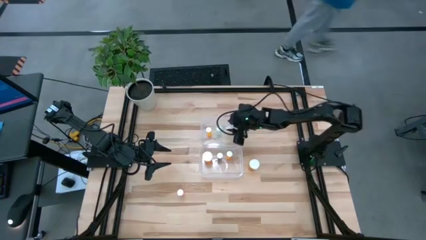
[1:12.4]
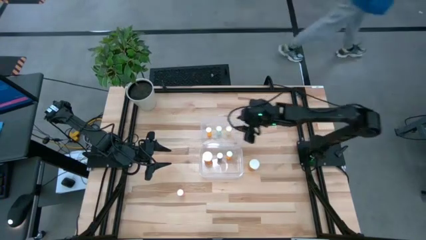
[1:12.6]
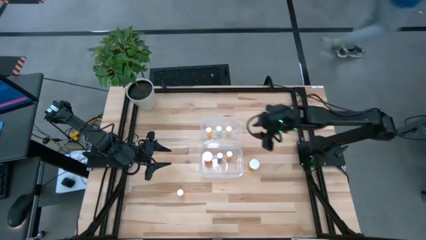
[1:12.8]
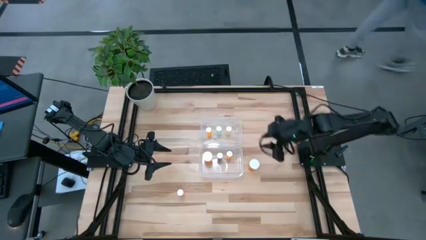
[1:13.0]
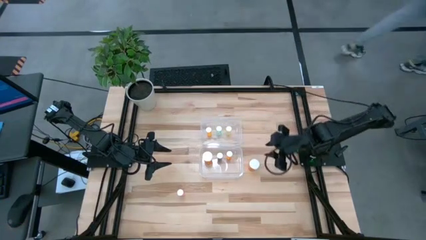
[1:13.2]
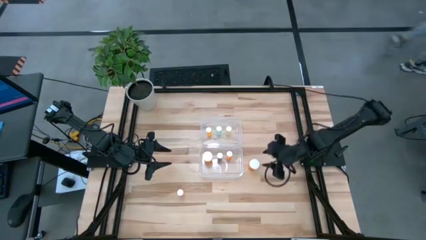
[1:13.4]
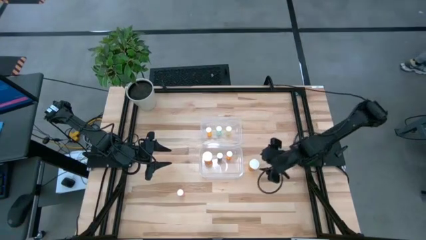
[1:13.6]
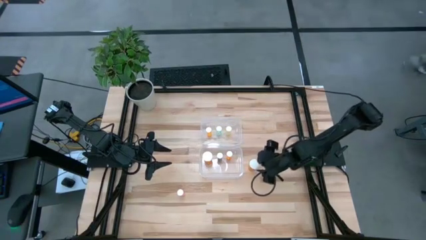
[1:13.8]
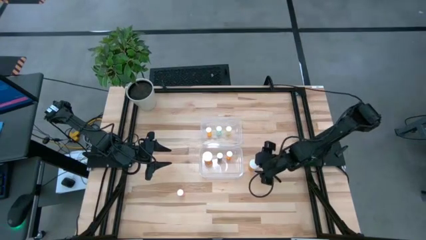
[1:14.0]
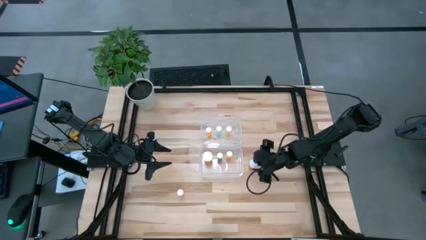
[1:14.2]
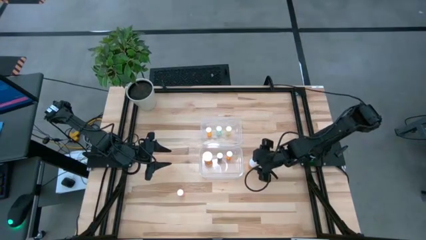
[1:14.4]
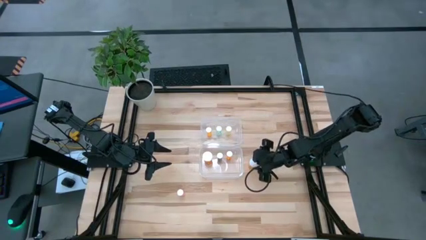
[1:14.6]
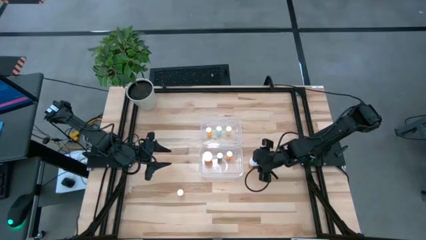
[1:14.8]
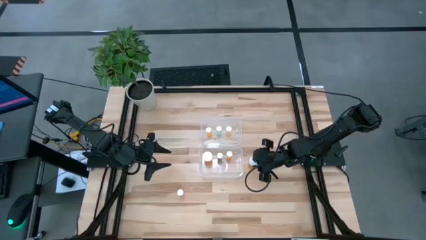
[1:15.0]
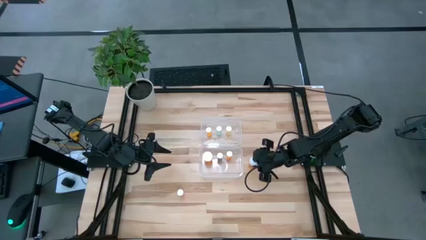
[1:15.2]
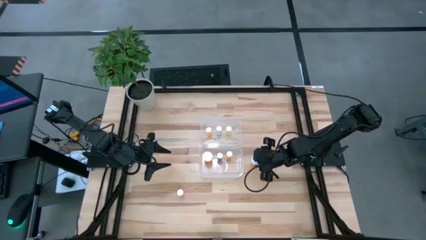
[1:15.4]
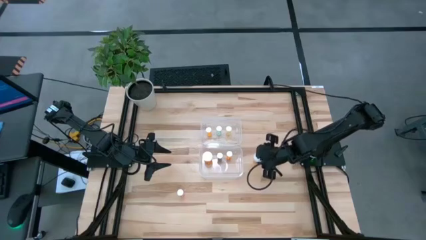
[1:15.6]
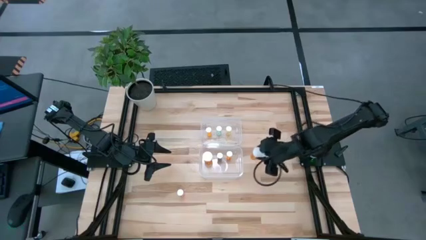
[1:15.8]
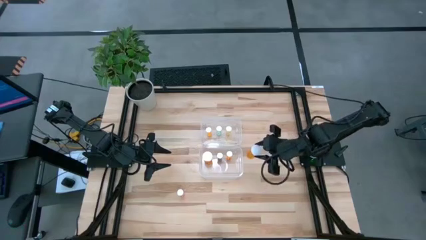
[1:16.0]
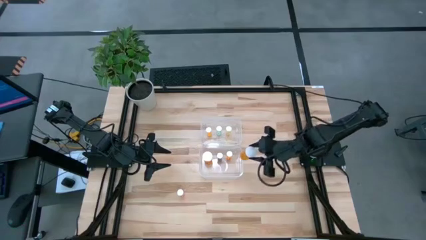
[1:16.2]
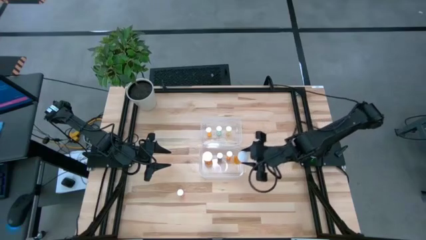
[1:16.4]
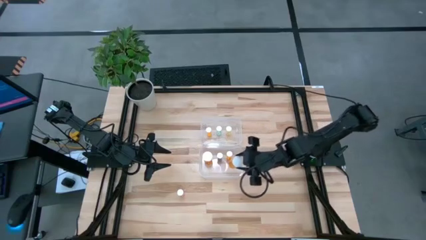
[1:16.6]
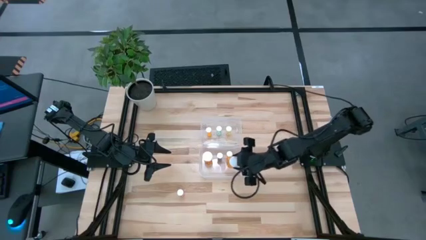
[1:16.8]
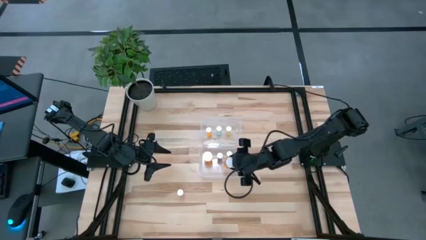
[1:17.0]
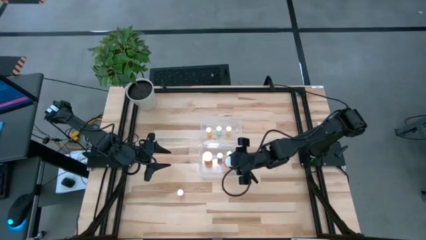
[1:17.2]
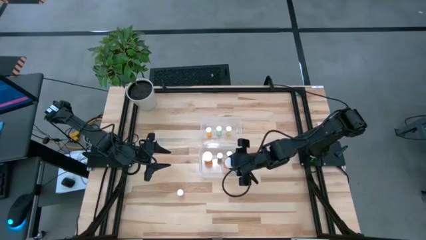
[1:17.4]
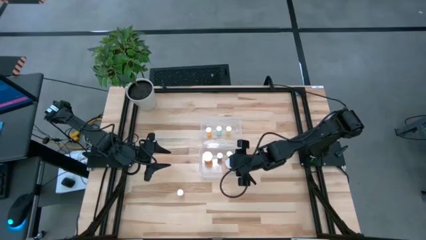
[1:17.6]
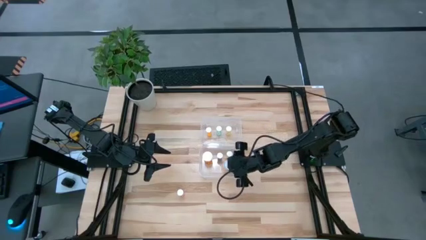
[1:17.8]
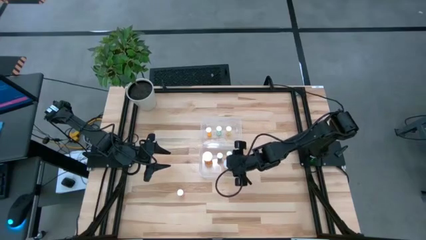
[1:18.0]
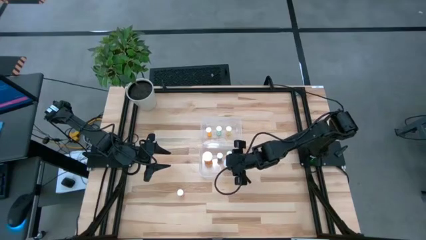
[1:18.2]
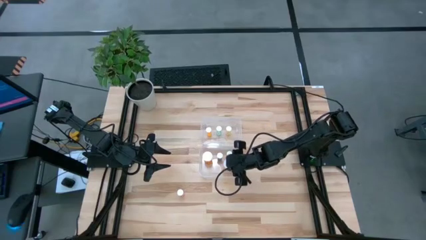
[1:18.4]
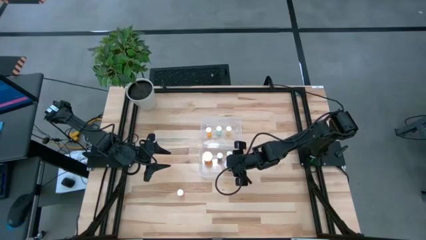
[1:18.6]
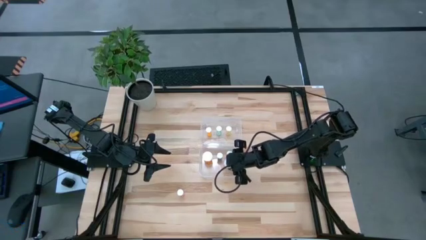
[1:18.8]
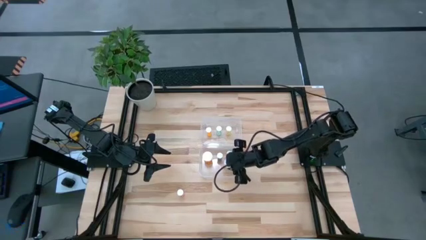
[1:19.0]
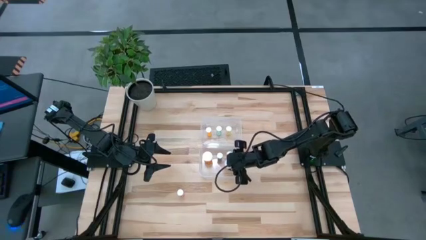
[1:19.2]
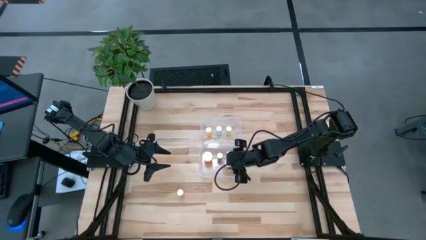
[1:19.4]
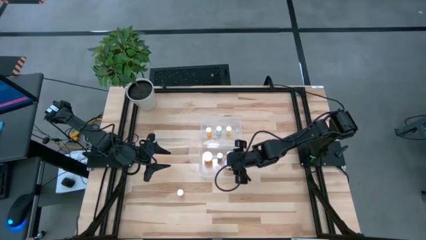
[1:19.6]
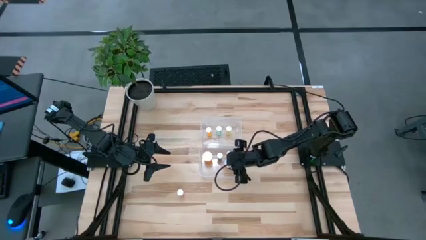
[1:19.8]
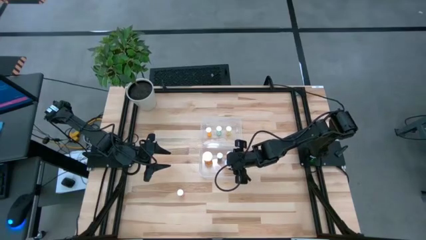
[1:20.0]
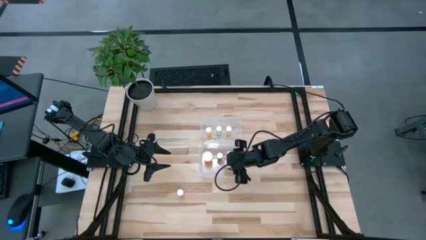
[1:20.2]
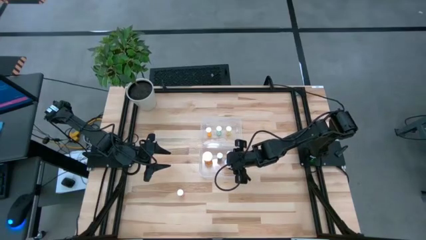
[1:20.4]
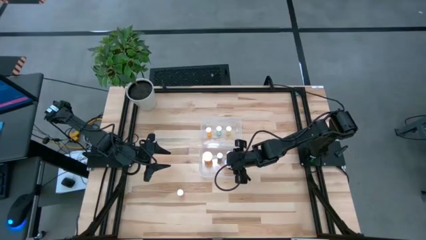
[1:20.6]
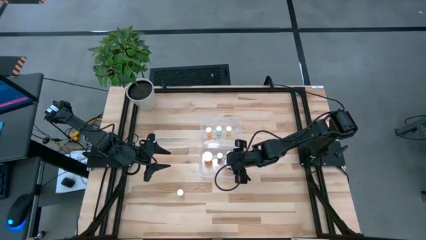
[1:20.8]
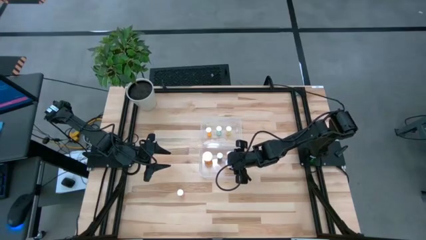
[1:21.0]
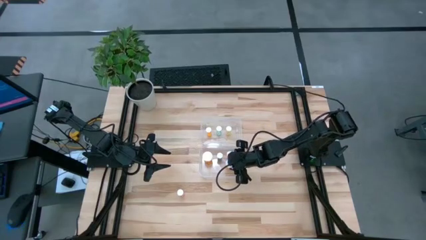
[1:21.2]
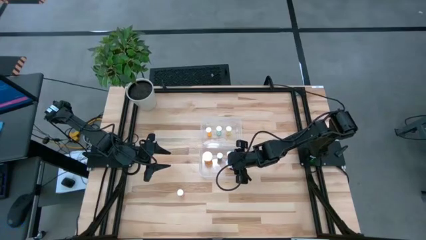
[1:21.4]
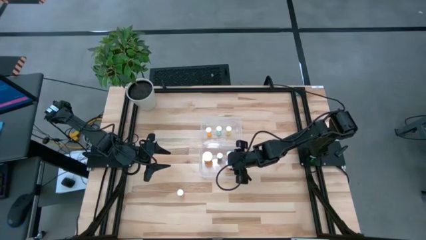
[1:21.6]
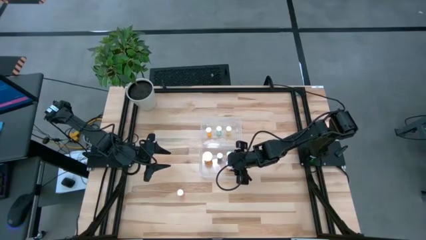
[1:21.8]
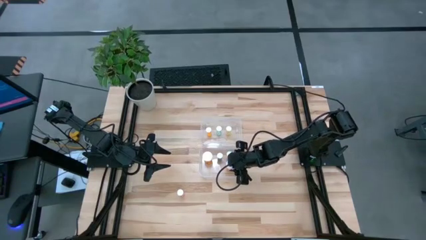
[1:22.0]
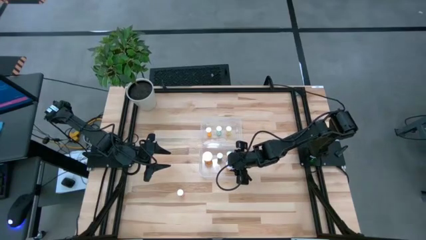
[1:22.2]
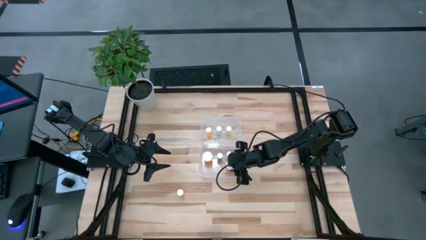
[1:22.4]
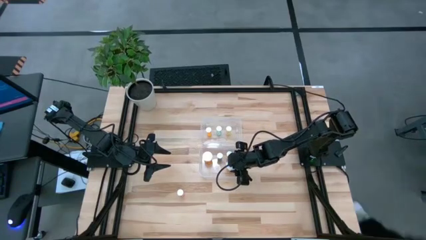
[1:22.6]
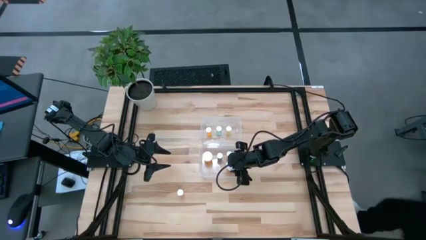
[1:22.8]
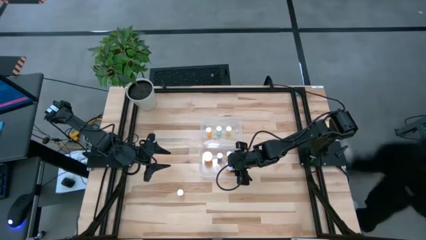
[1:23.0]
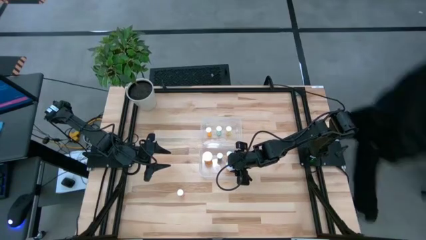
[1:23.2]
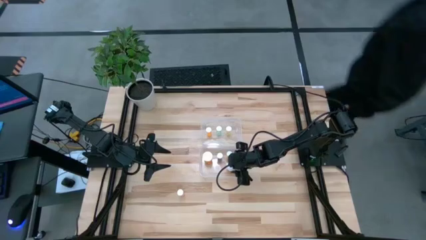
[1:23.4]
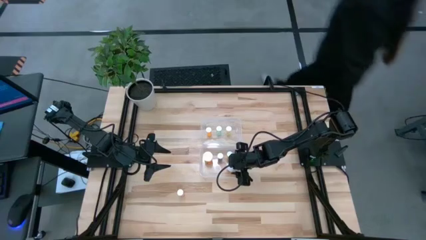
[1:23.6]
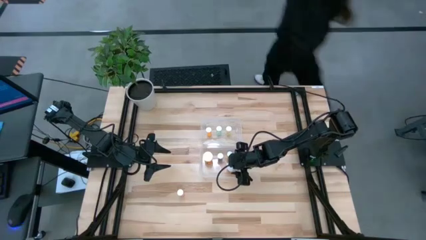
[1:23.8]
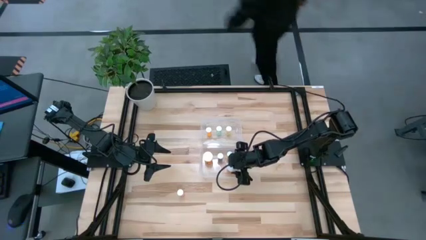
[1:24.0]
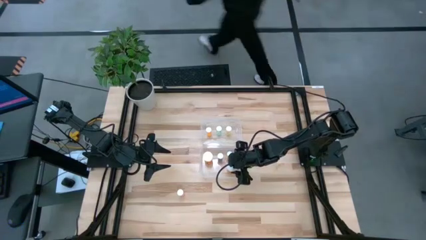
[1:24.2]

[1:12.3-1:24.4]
Task: Pick and place medicine bottles into bin by pill shape (circle, oval)
Put the orange capsule bottle into the bottom transparent bin

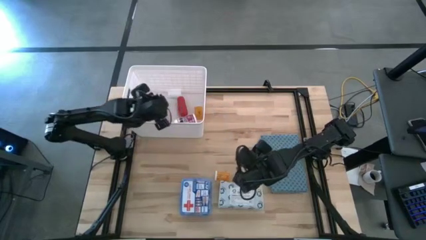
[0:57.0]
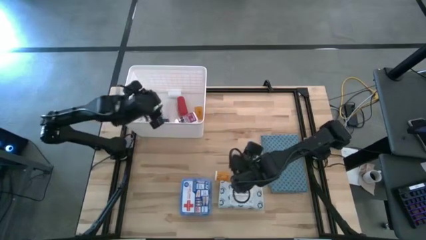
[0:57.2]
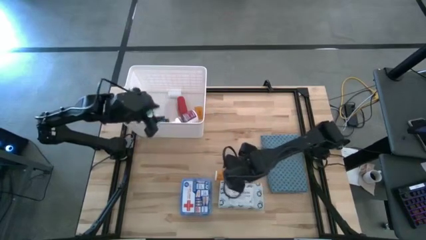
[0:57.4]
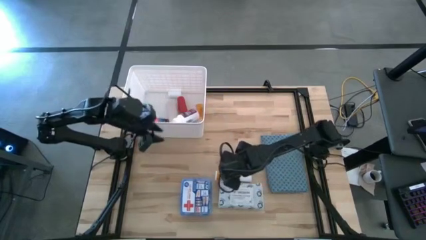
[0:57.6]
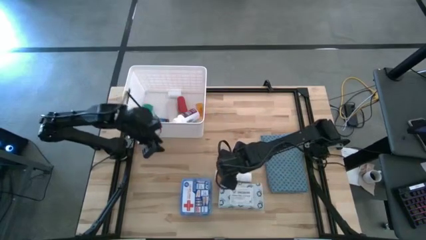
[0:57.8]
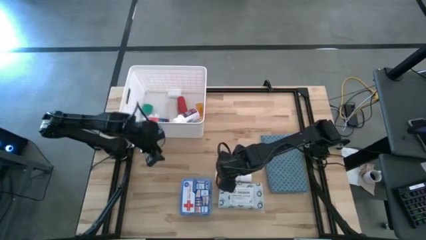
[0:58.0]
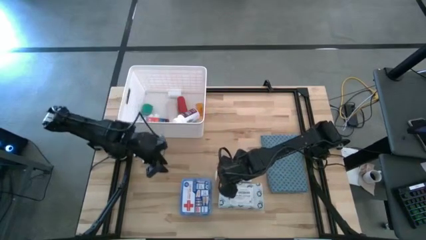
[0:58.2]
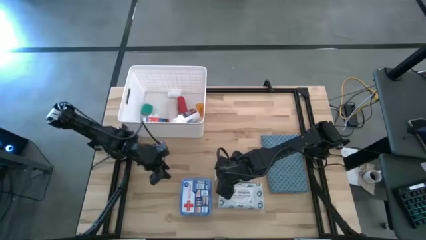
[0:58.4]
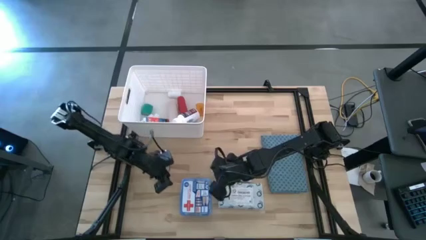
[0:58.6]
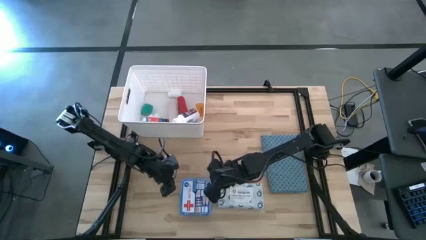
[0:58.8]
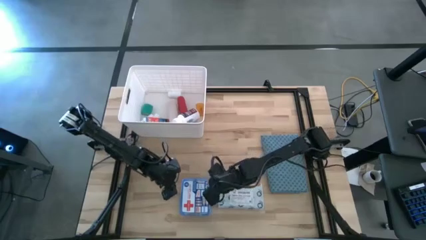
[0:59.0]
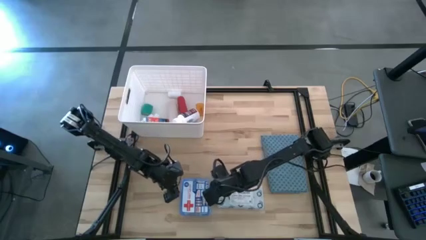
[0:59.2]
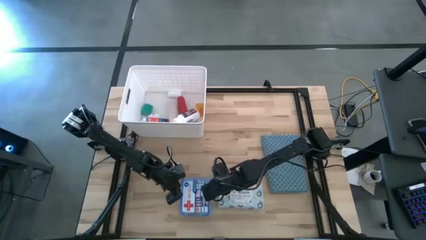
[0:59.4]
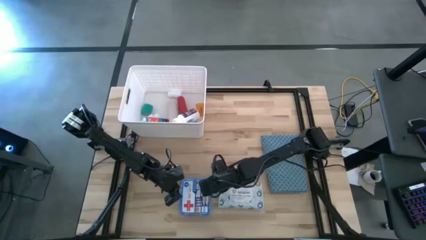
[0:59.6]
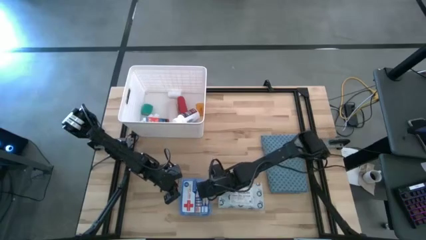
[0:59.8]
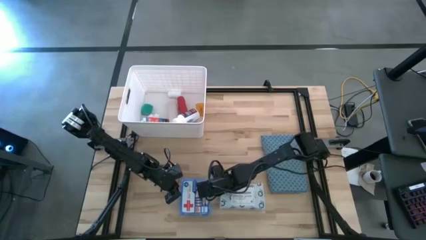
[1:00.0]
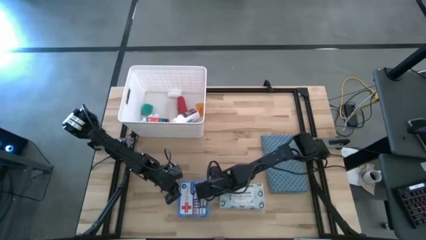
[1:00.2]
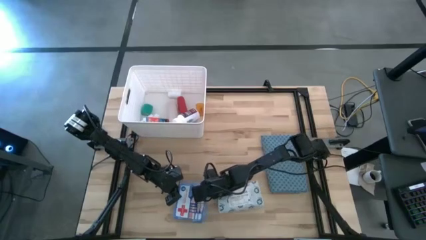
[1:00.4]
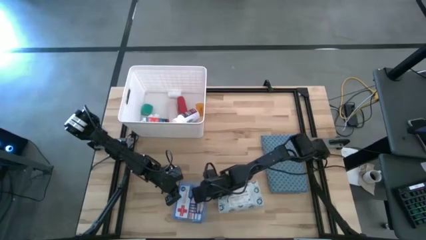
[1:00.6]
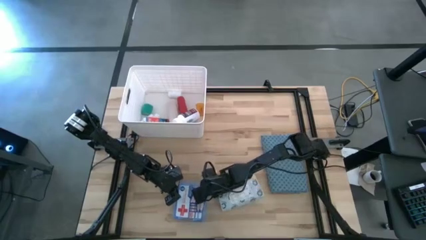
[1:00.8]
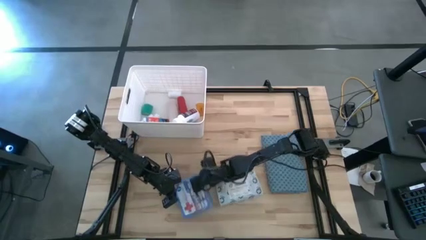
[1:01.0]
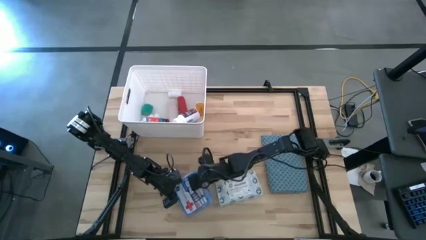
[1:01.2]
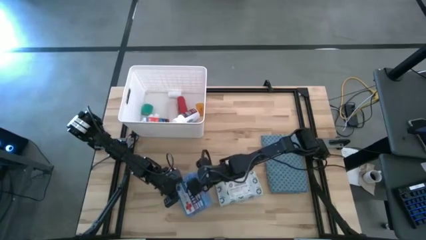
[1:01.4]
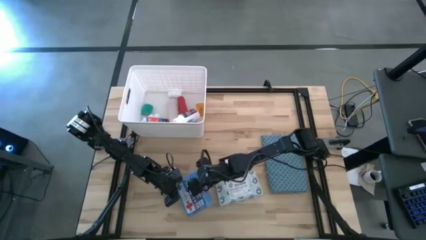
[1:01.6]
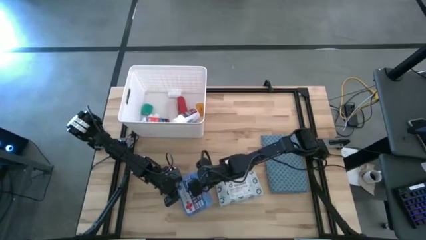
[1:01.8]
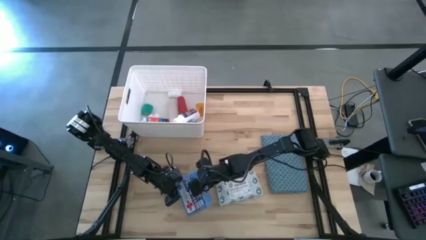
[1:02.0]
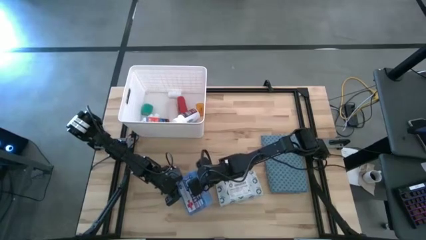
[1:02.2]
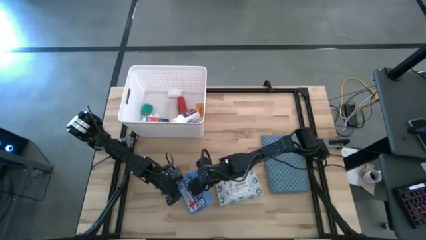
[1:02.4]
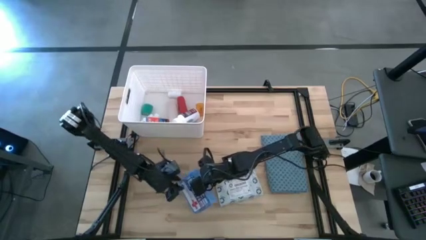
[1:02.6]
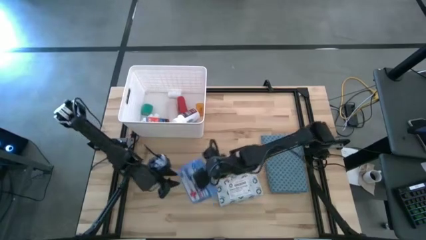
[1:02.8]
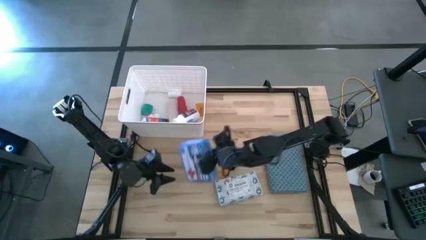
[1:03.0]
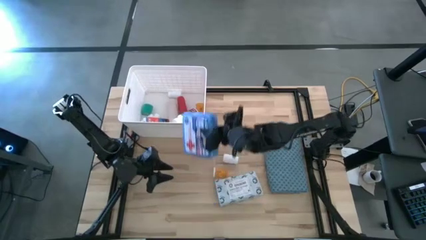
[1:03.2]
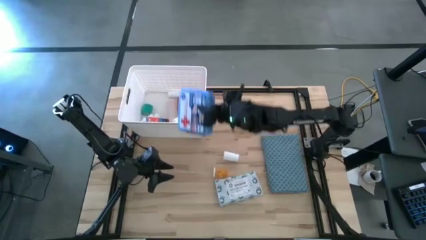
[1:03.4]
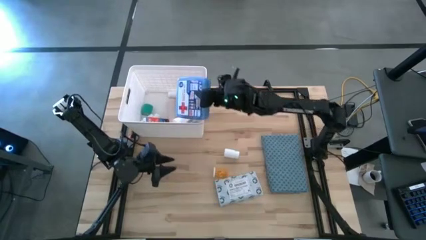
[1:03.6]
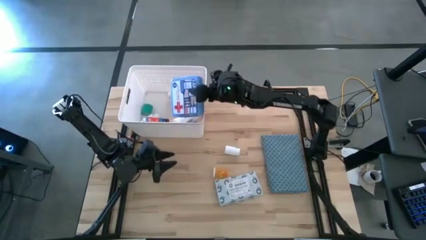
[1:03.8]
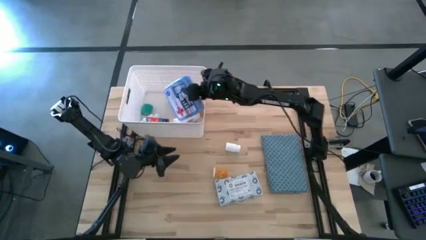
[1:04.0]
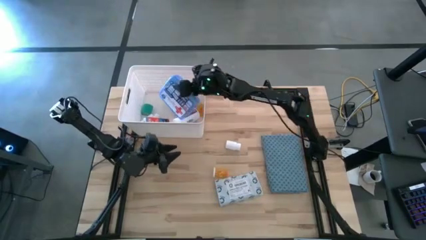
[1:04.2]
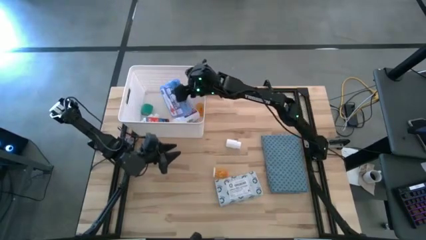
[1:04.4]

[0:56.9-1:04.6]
Task: Pick & place medical supplies in basket/bin
Put the blue medicine kit into the white bin
